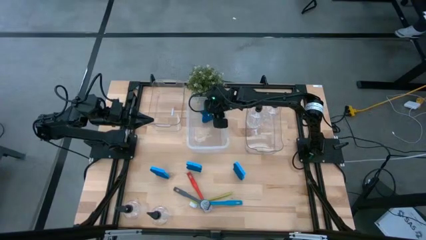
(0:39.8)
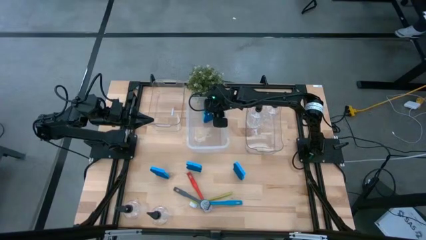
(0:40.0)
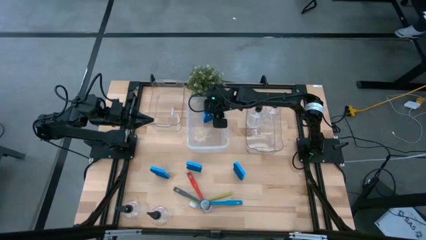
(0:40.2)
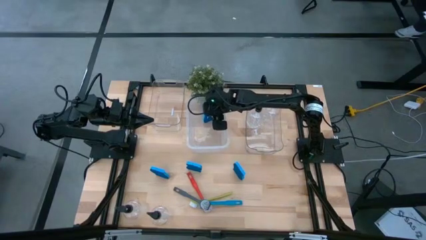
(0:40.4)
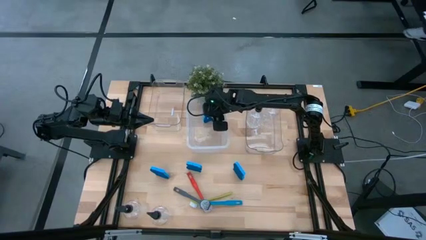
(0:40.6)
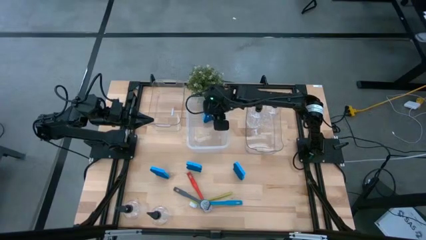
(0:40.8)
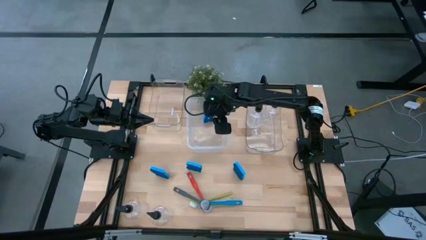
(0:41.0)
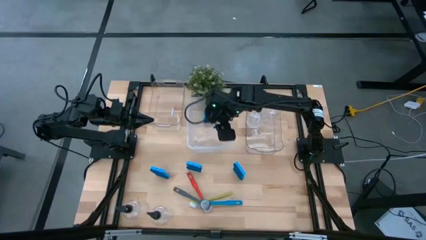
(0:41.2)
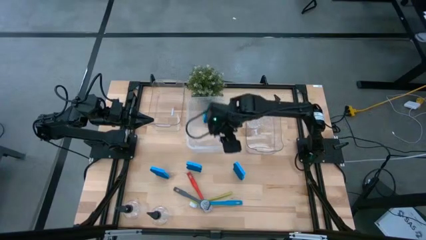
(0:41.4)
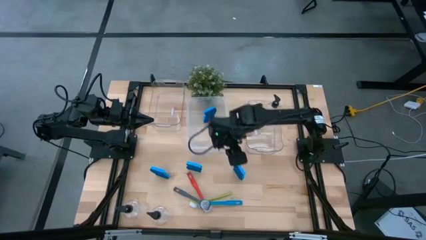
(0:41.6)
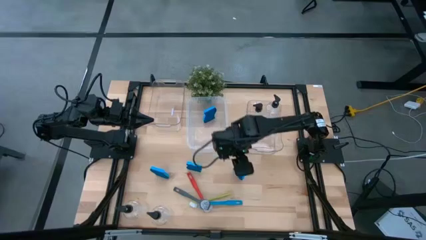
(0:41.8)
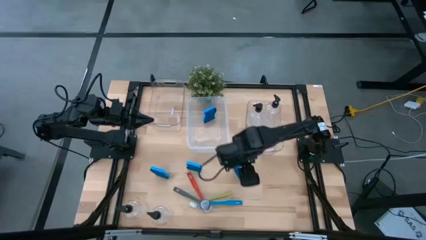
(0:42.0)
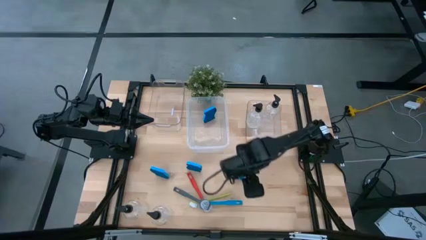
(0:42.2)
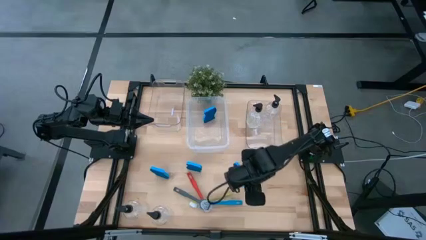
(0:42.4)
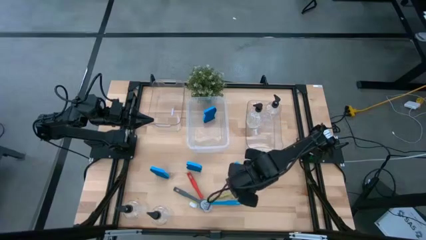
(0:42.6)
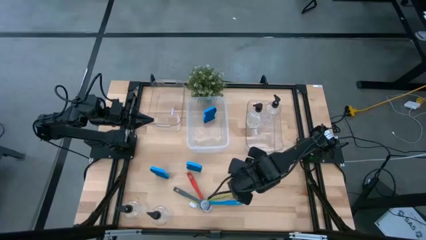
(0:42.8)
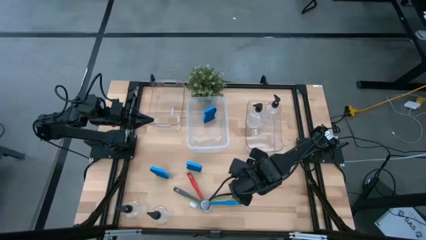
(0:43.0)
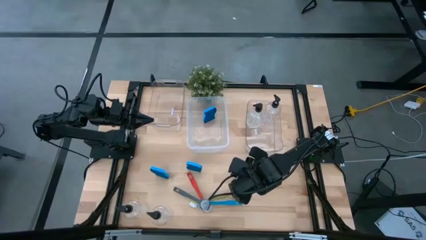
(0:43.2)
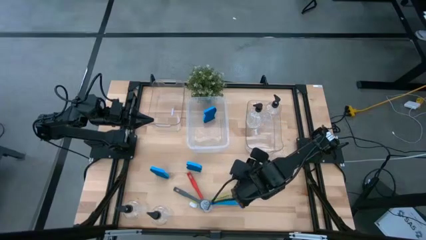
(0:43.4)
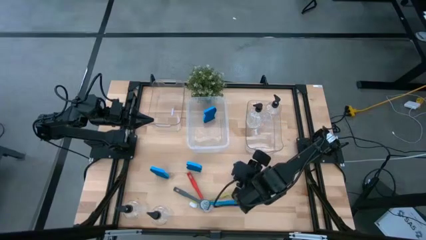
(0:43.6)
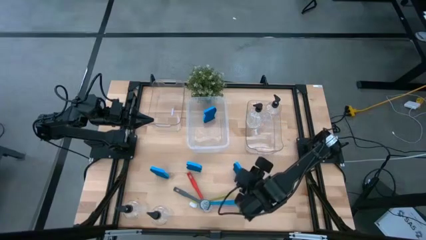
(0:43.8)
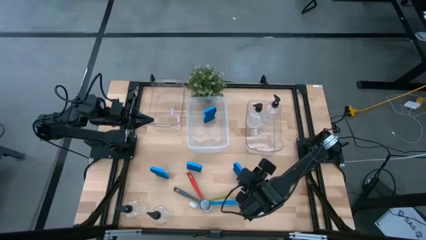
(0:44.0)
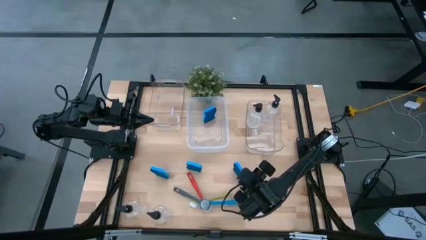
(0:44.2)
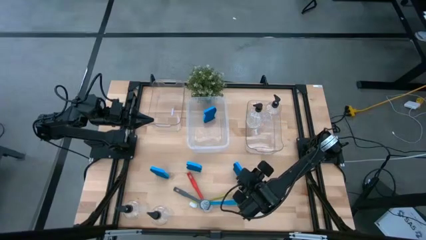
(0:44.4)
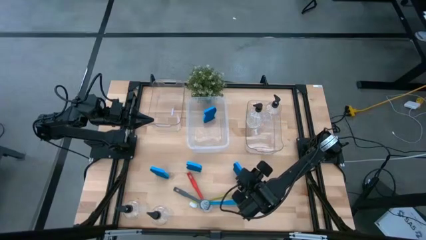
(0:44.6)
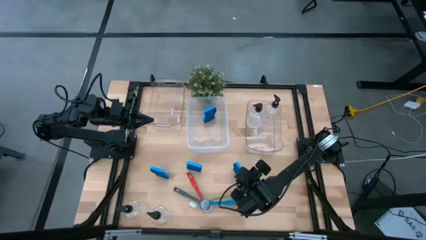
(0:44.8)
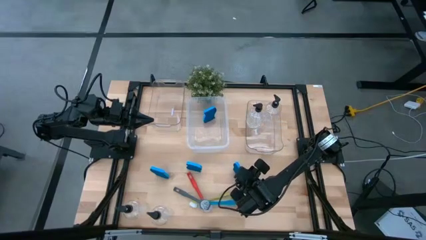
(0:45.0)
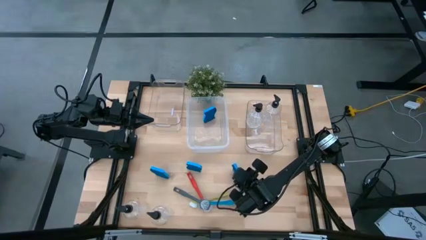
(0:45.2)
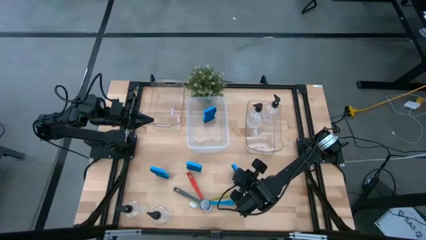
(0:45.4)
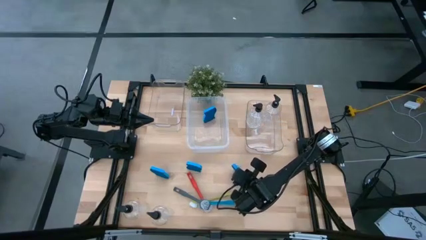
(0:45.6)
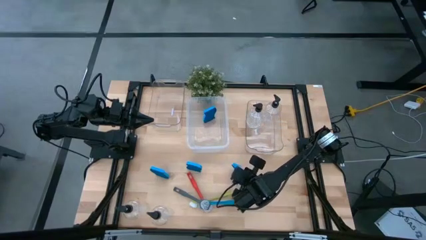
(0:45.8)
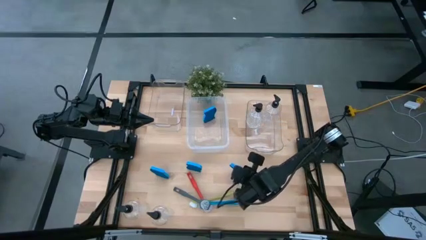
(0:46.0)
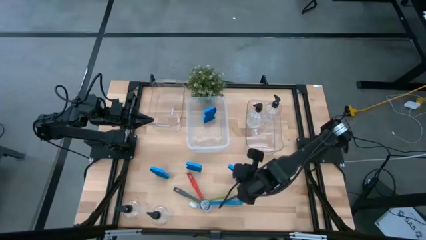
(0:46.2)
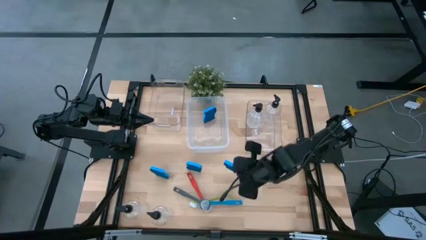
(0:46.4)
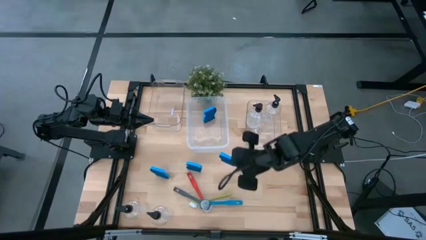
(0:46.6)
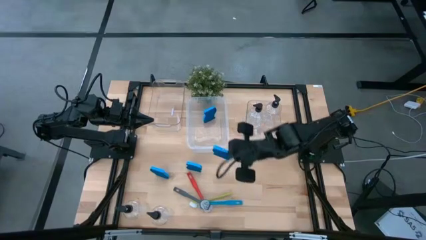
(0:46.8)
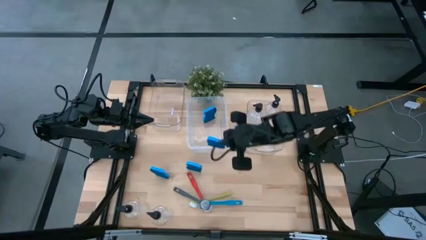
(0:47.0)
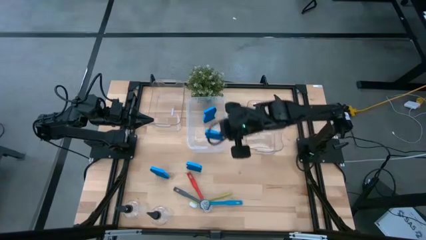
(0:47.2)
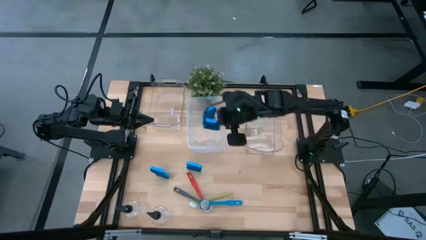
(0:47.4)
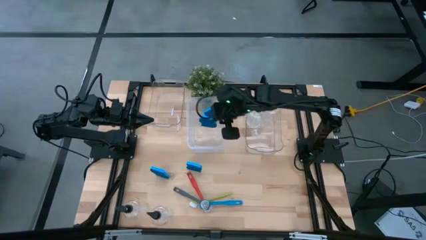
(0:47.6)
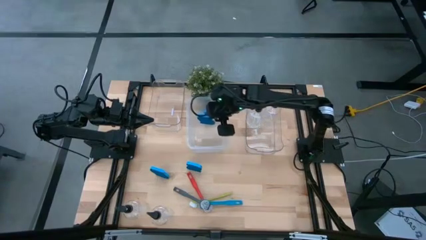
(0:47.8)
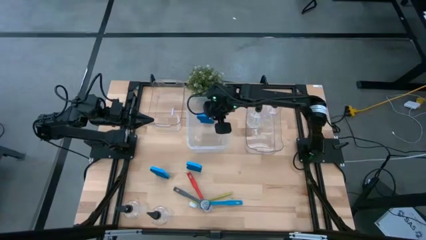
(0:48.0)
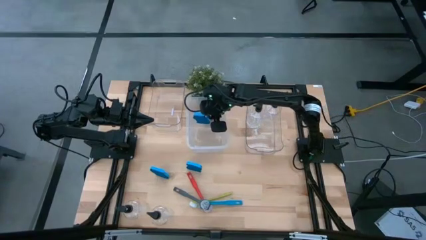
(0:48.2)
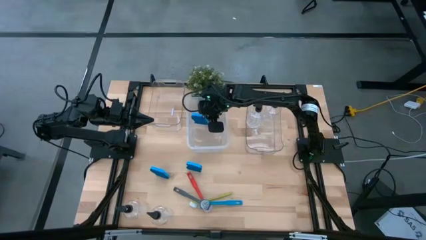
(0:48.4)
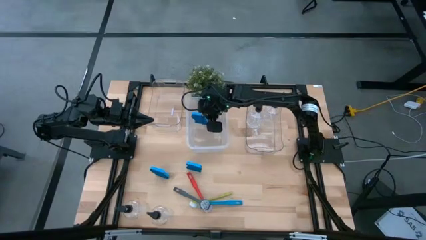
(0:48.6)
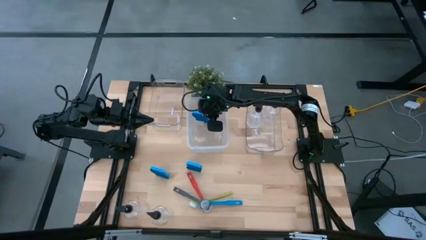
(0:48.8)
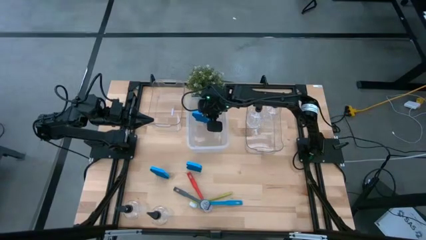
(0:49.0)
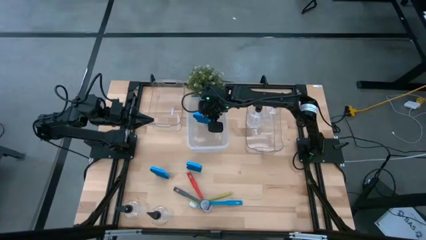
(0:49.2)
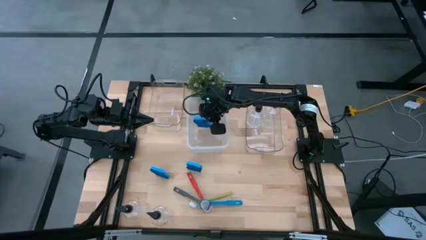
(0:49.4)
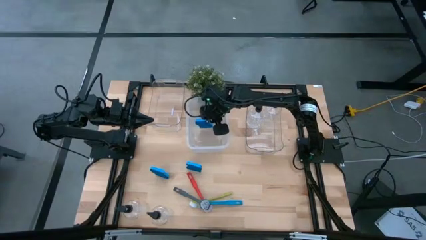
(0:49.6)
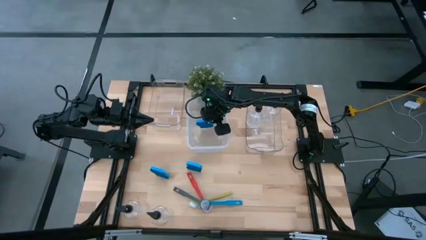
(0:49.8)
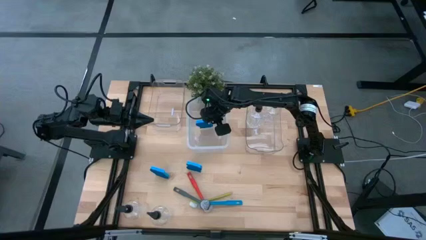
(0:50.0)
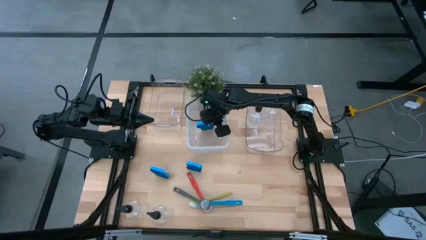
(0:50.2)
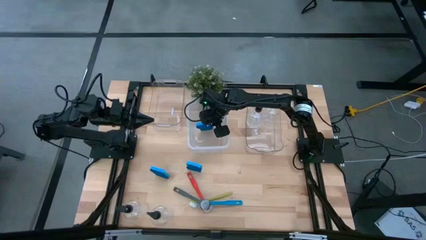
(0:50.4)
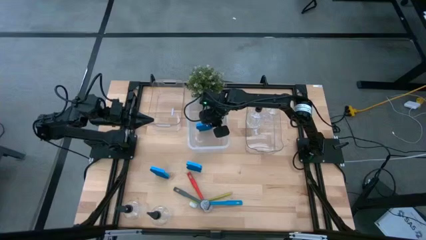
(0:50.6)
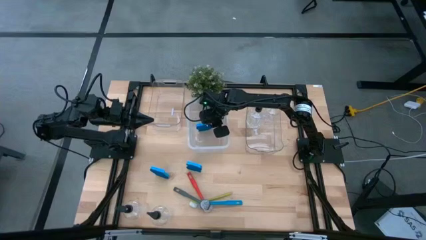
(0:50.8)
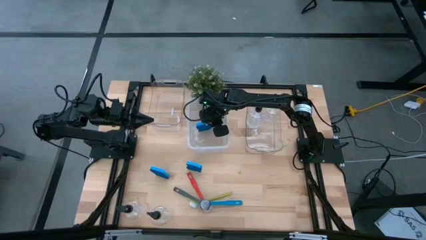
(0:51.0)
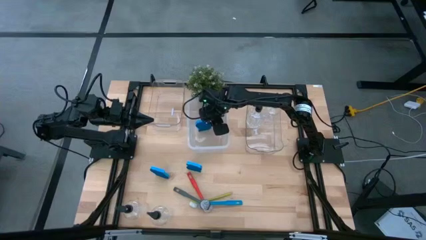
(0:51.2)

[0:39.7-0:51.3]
Task: Pick & Place Kitchen Sink Supplies
Put the blue sponge into the middle transparent bin
